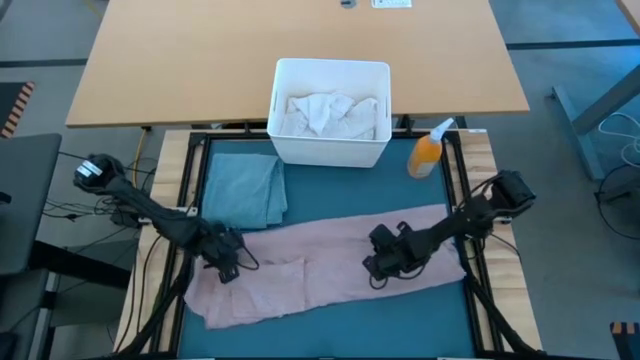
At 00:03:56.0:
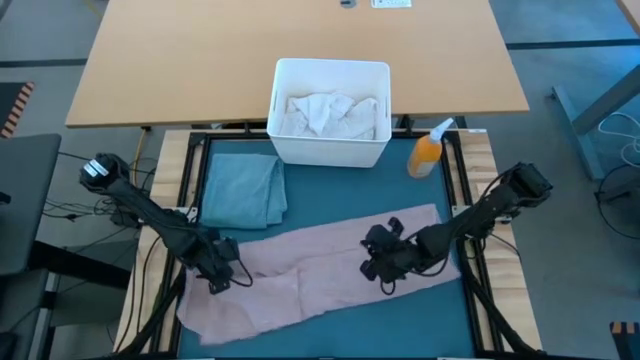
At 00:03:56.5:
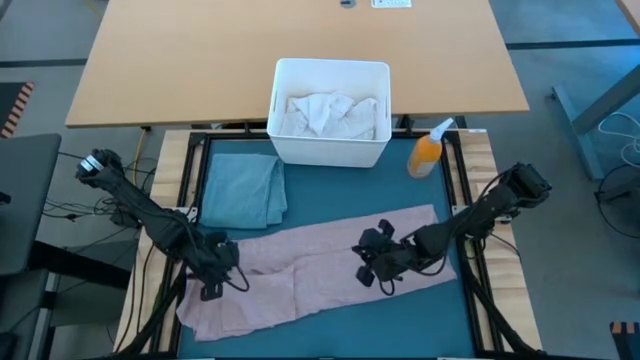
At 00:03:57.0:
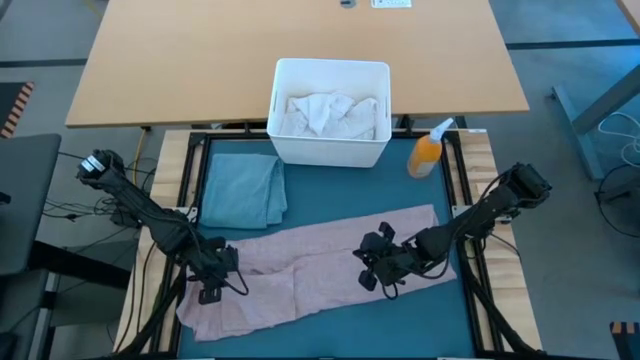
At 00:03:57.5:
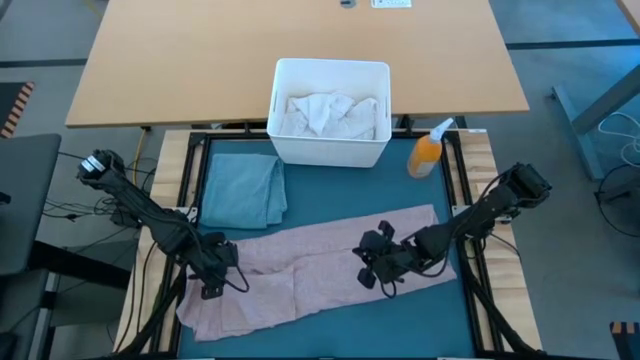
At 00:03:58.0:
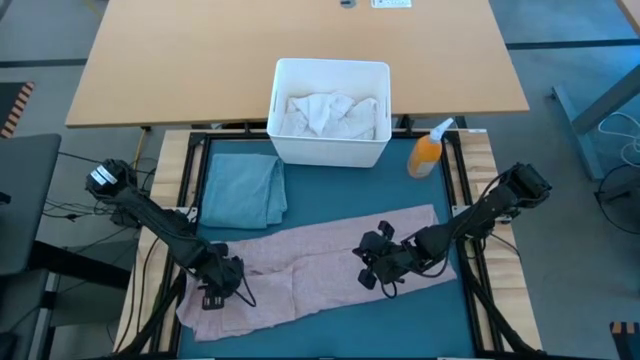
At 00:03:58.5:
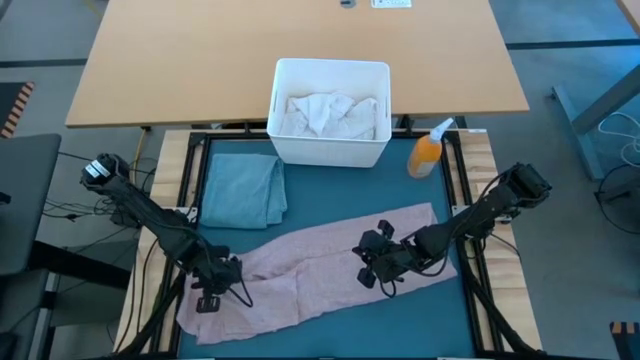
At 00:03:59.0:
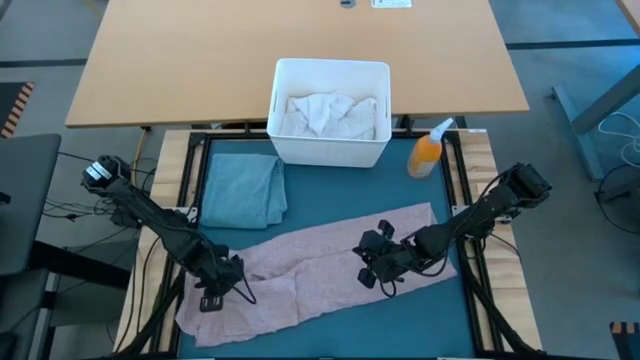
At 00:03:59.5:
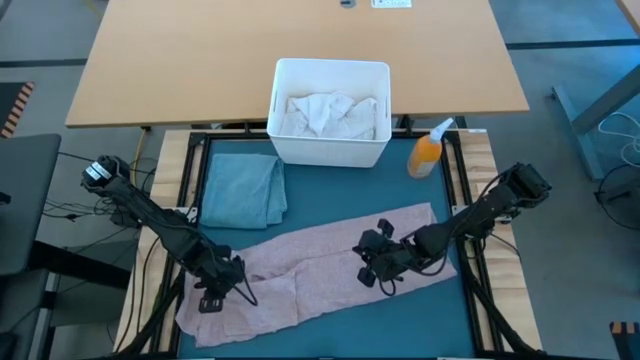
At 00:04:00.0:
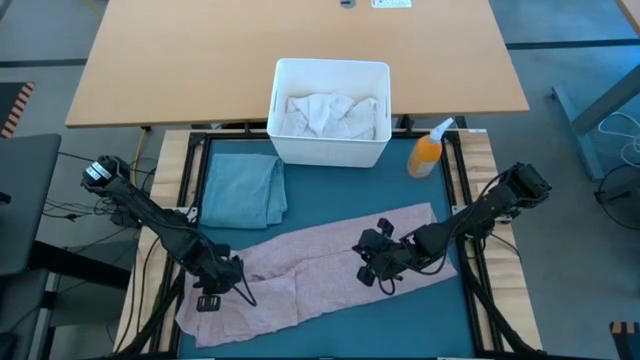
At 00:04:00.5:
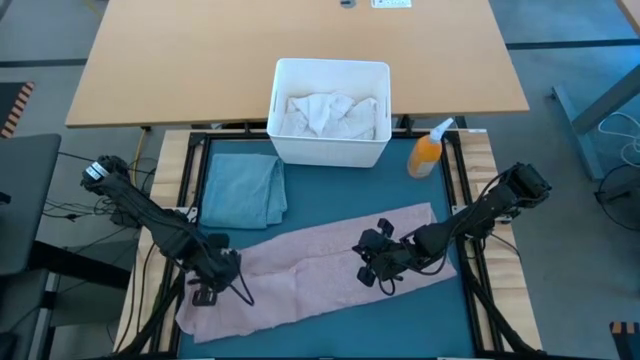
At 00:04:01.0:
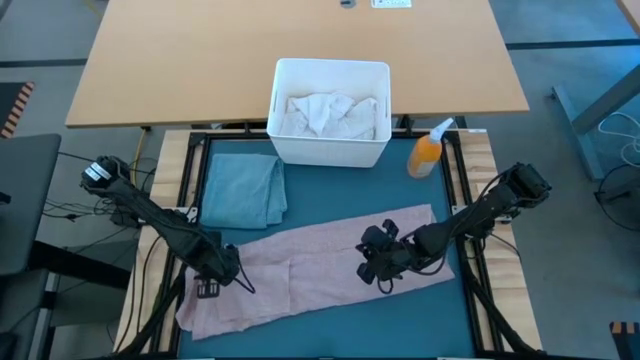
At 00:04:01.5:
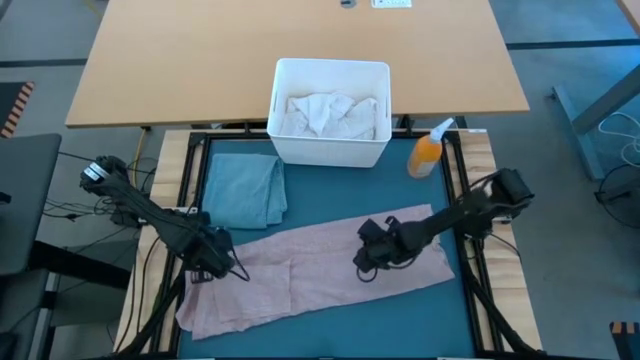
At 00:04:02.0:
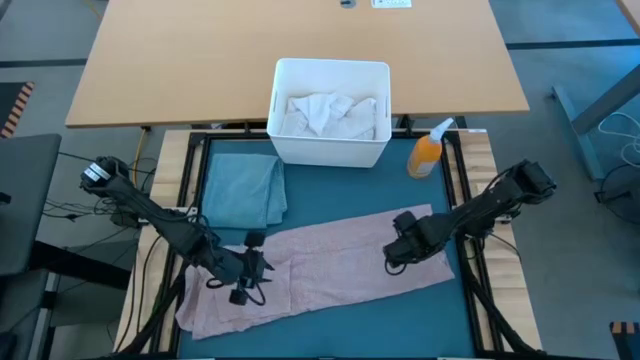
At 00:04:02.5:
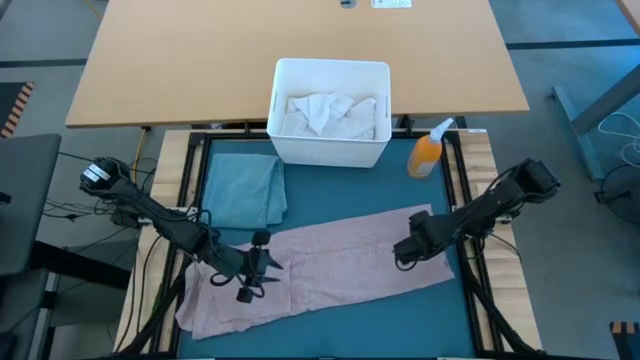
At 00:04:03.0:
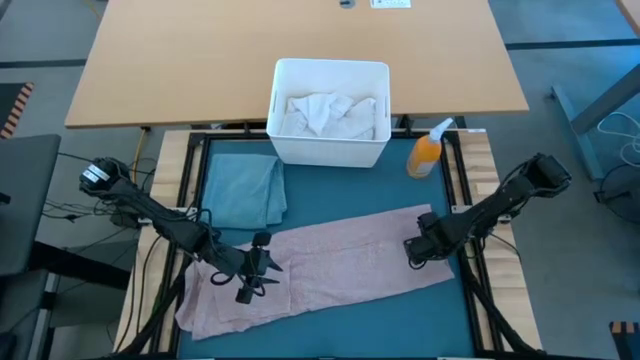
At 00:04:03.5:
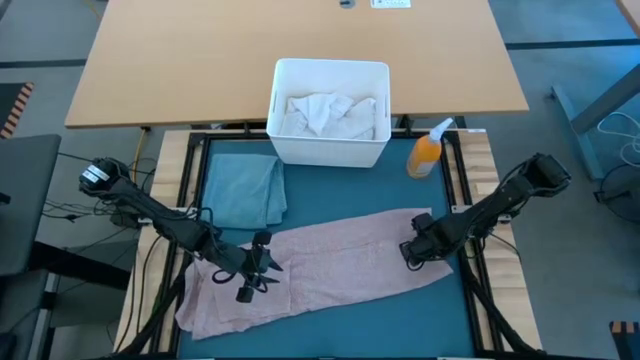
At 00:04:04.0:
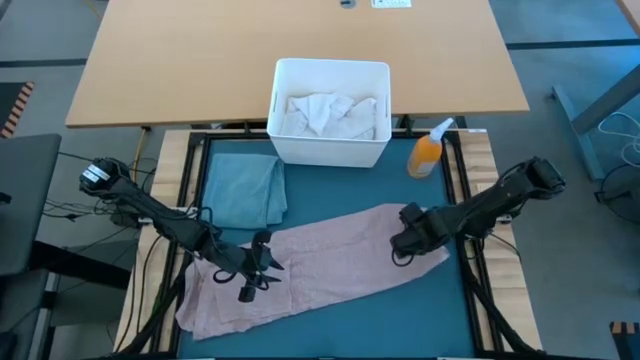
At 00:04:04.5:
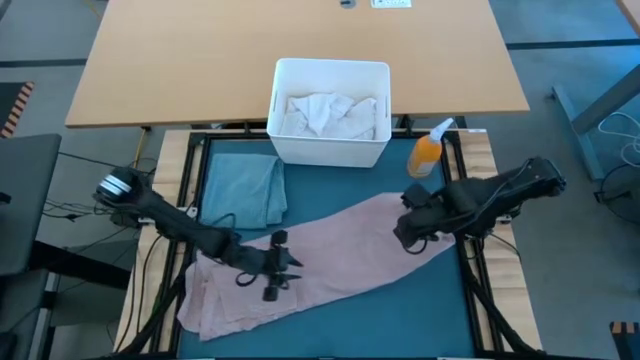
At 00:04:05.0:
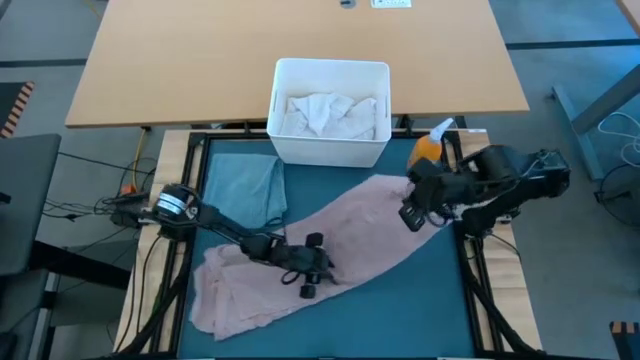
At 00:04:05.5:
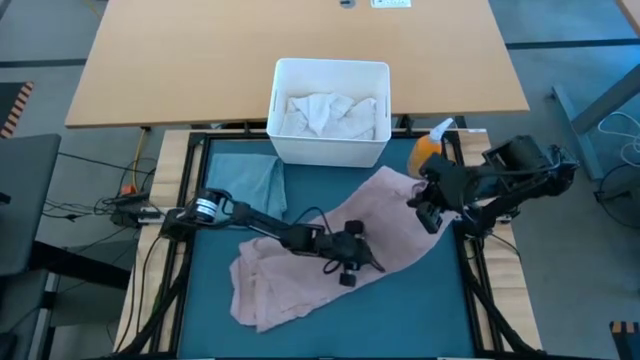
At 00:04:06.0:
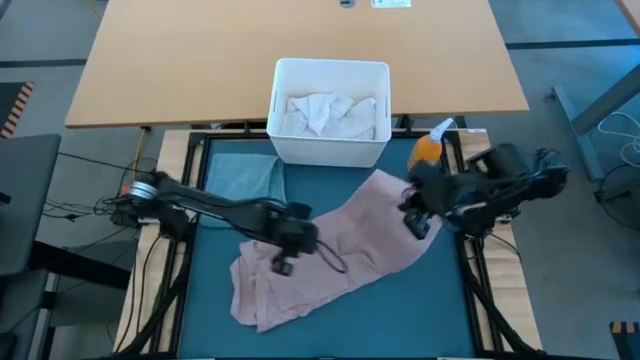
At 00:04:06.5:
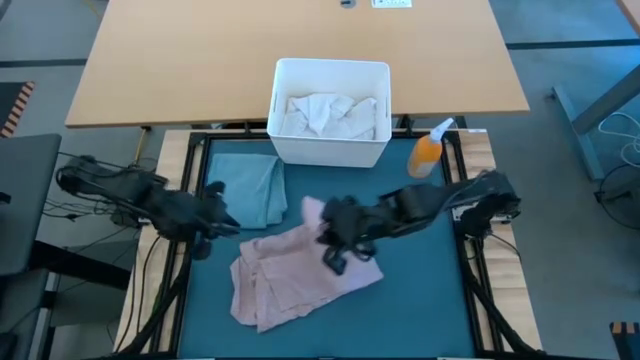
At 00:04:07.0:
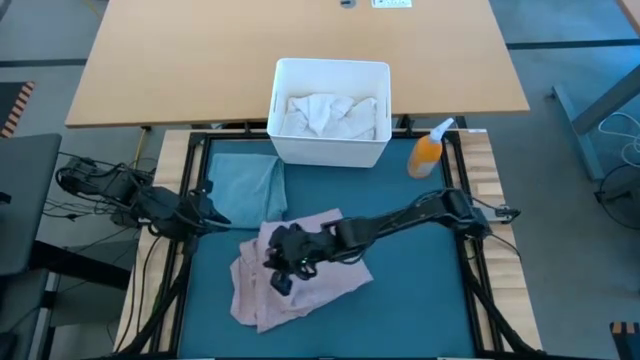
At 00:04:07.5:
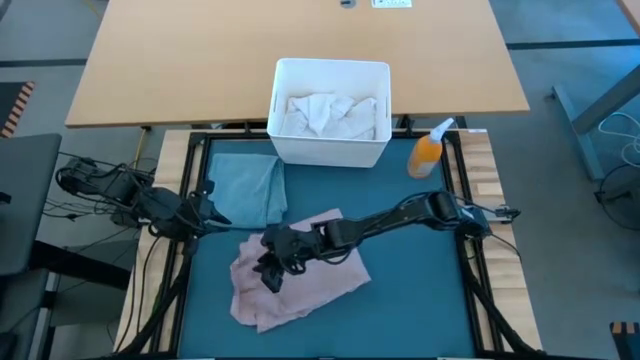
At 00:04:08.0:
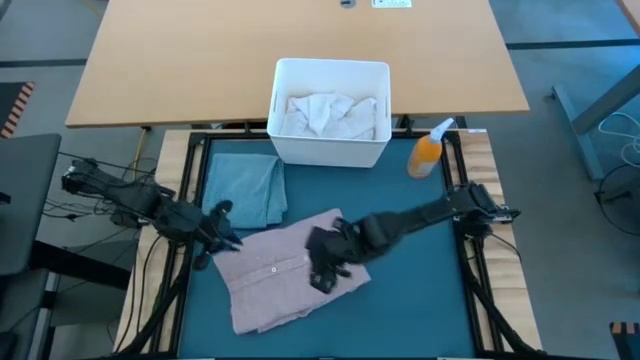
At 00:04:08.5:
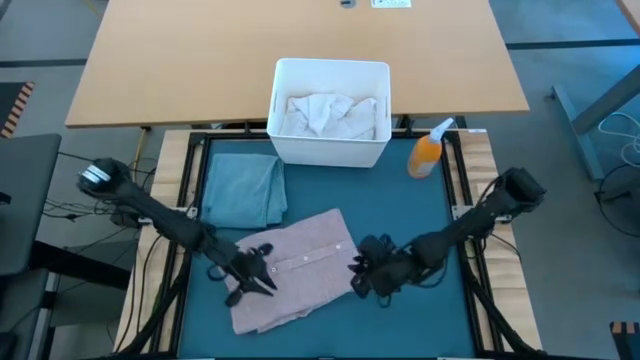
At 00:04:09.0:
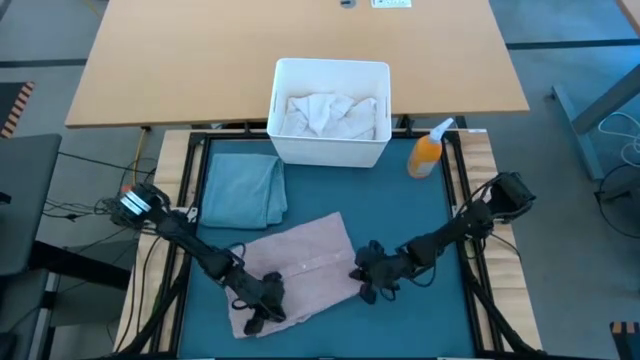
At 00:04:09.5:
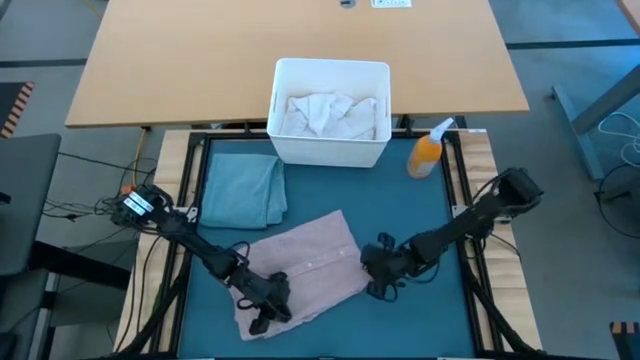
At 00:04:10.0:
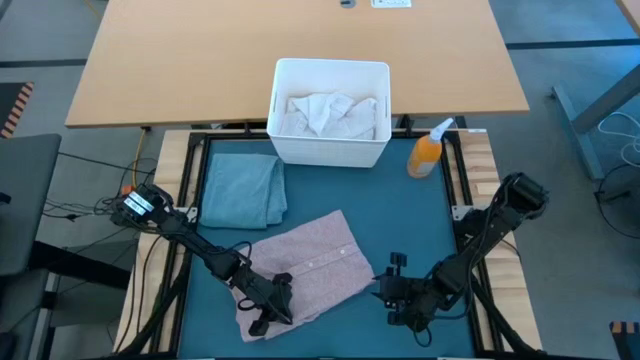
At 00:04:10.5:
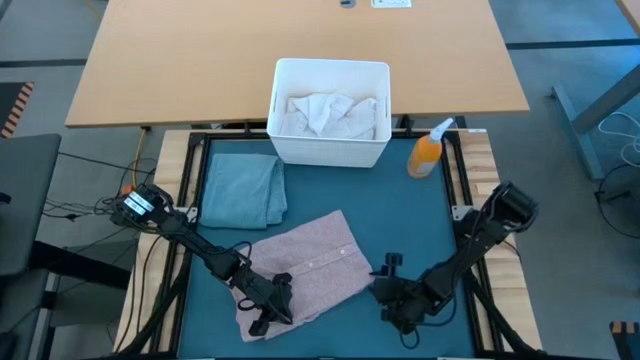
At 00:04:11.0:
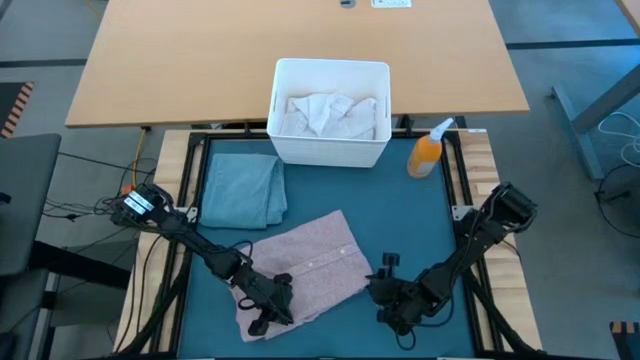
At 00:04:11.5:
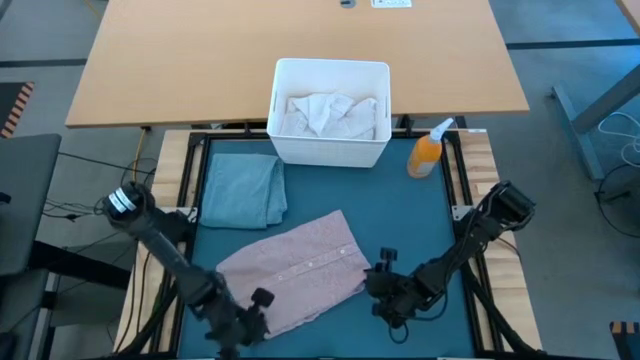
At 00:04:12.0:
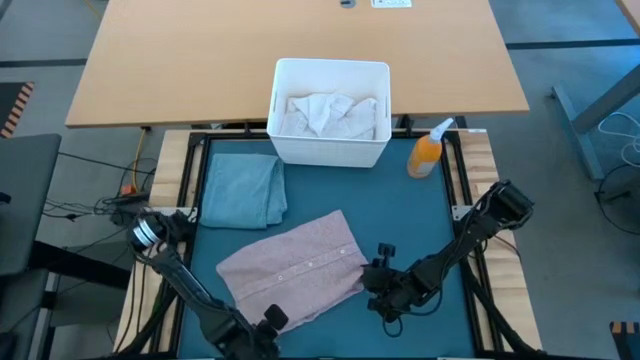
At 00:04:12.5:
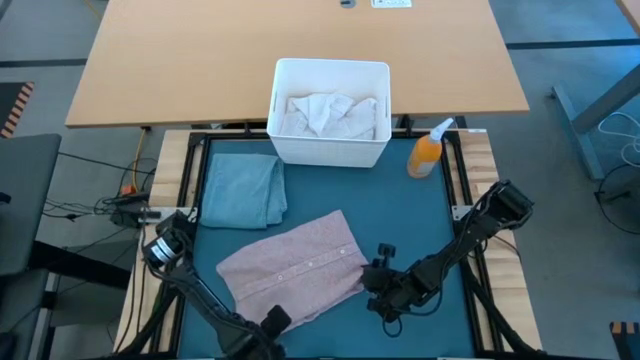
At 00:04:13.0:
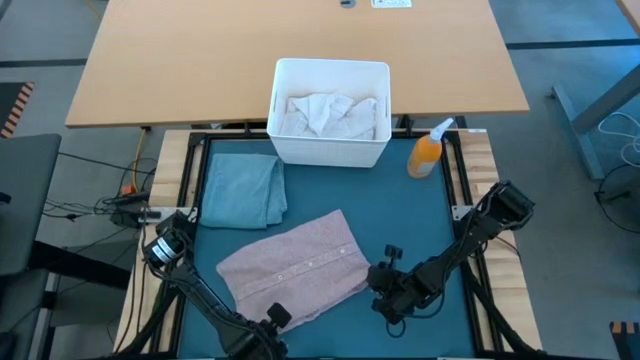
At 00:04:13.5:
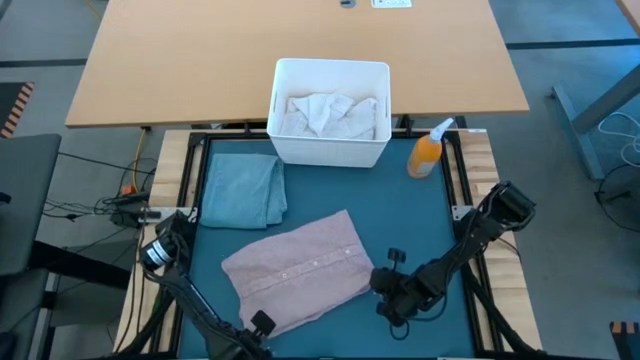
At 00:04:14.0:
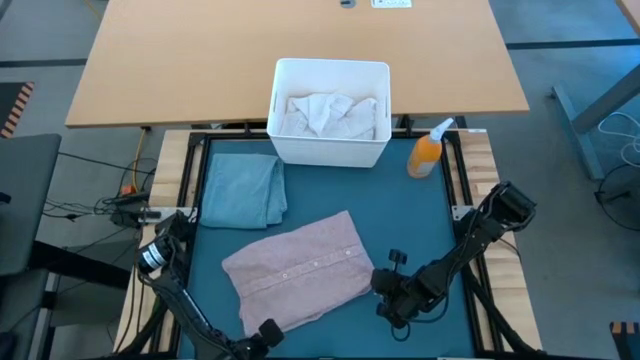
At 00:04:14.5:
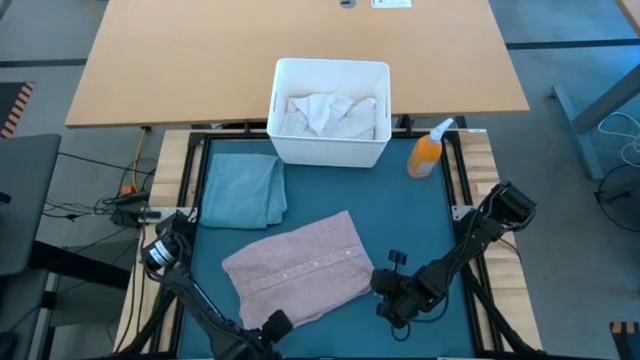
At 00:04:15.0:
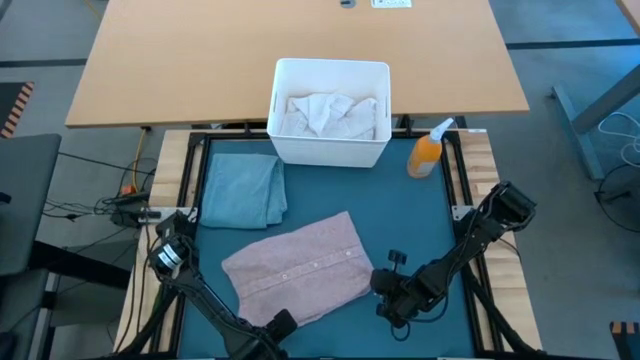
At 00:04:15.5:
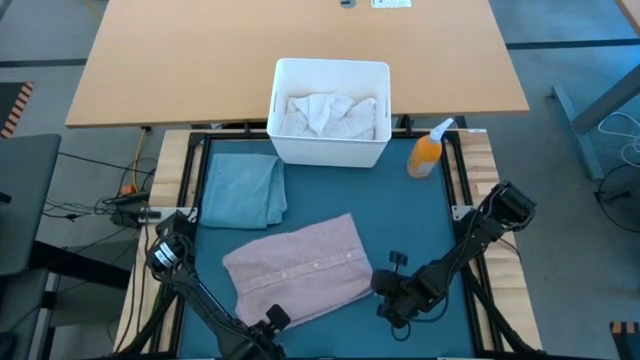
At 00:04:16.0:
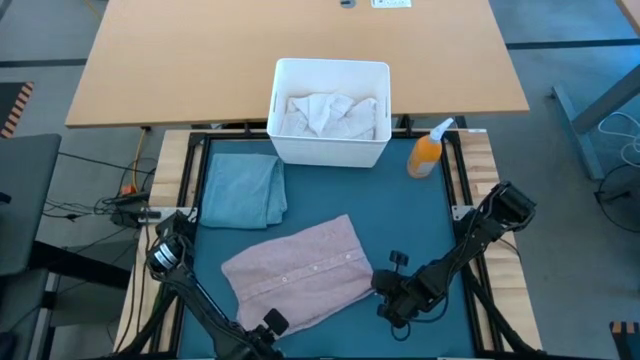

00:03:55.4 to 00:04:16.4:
Task: Fold Laundry from Bin
Fold the pink shirt
